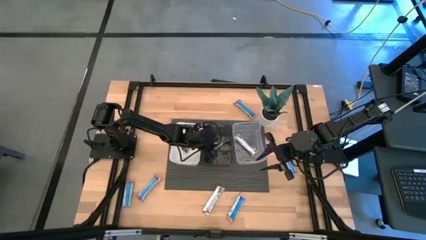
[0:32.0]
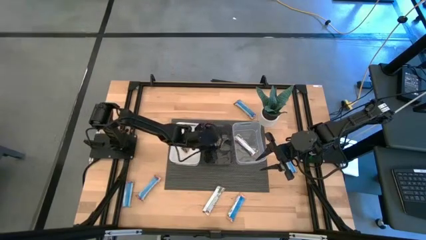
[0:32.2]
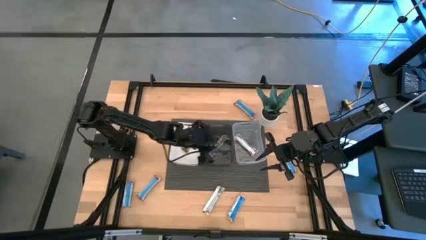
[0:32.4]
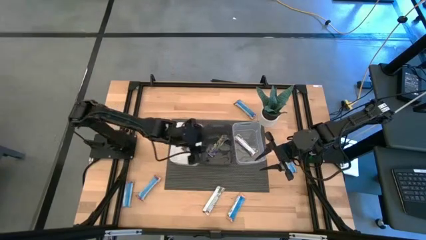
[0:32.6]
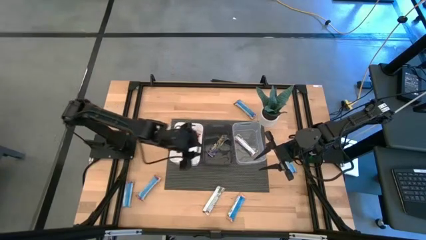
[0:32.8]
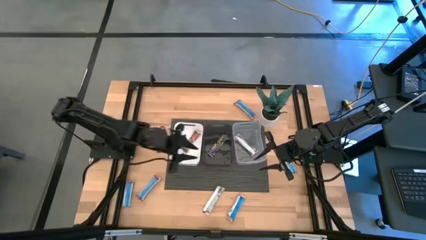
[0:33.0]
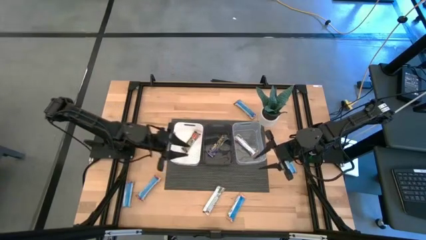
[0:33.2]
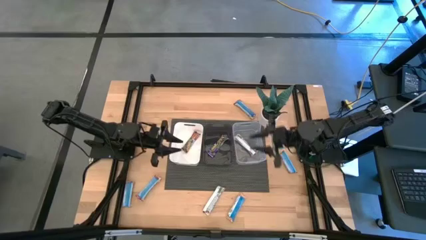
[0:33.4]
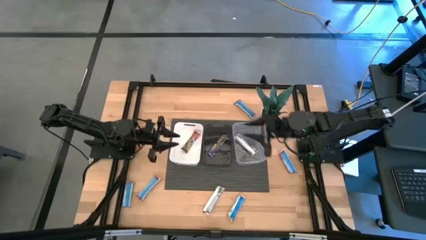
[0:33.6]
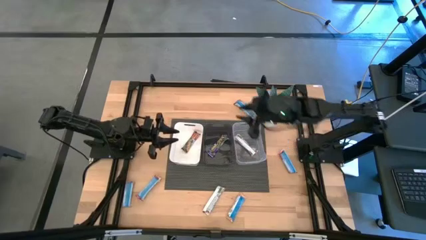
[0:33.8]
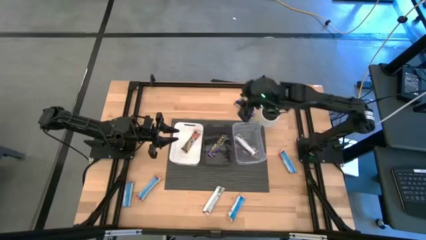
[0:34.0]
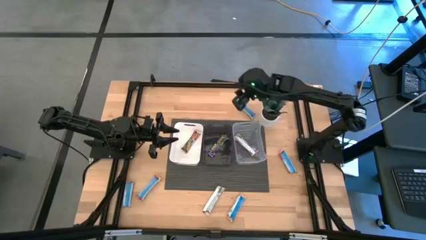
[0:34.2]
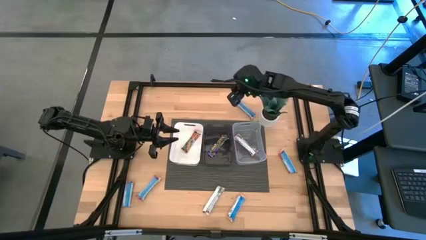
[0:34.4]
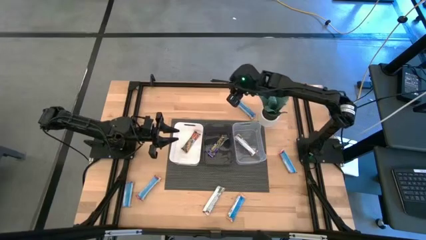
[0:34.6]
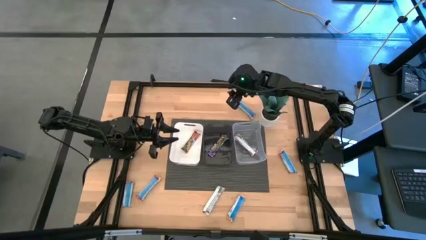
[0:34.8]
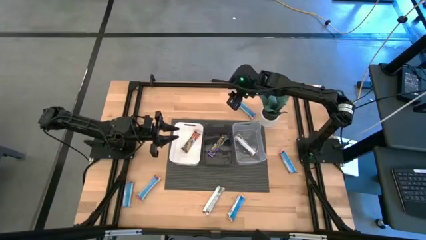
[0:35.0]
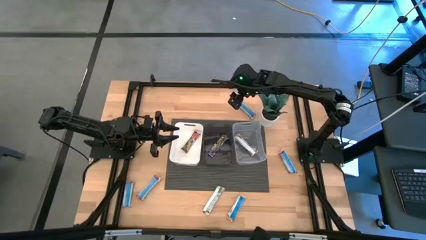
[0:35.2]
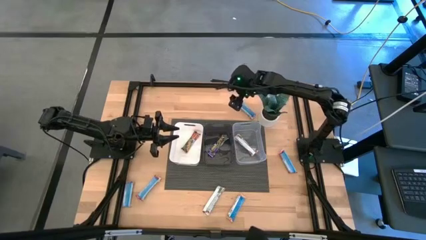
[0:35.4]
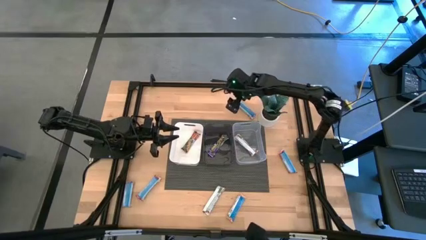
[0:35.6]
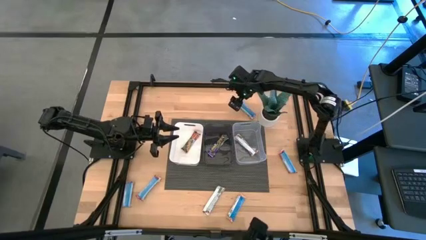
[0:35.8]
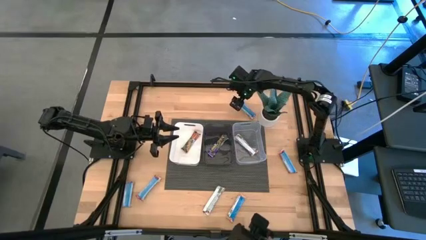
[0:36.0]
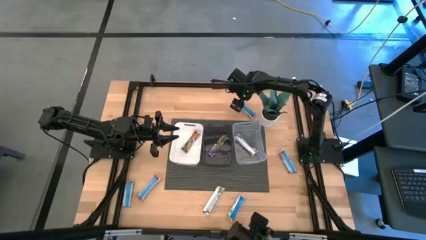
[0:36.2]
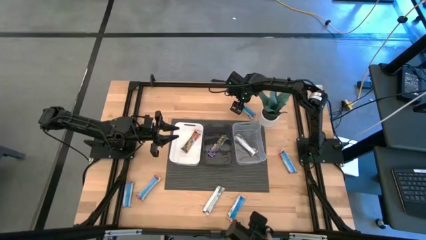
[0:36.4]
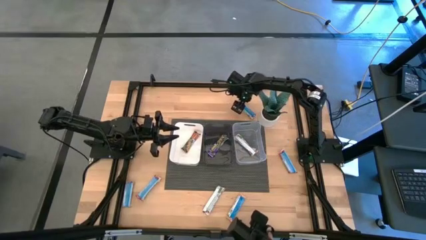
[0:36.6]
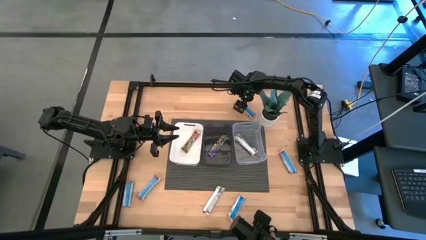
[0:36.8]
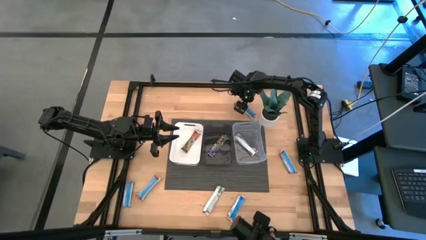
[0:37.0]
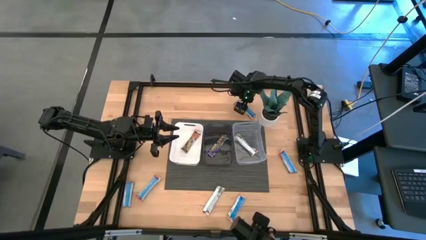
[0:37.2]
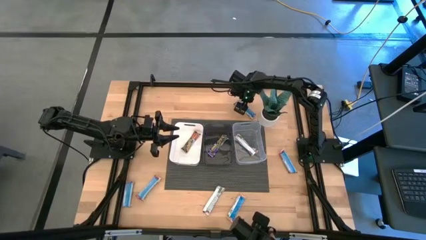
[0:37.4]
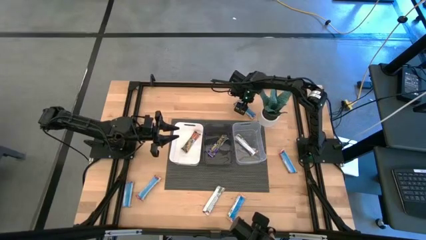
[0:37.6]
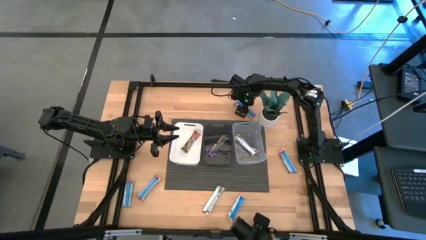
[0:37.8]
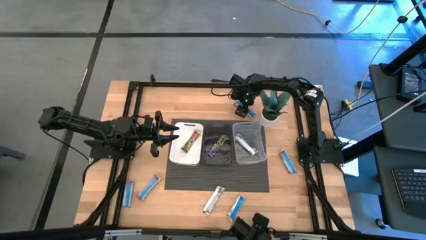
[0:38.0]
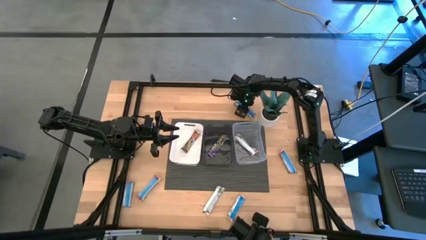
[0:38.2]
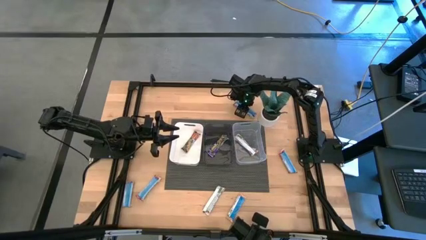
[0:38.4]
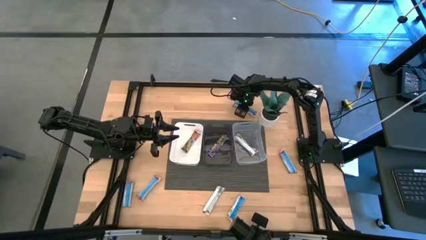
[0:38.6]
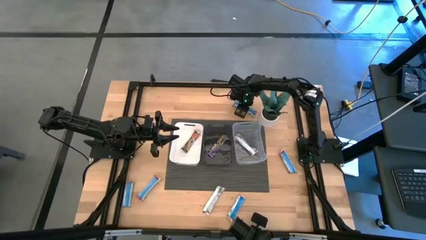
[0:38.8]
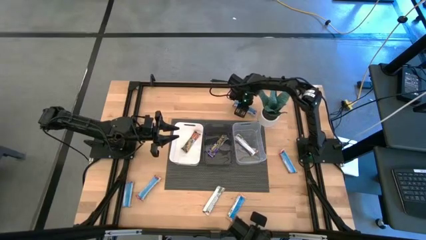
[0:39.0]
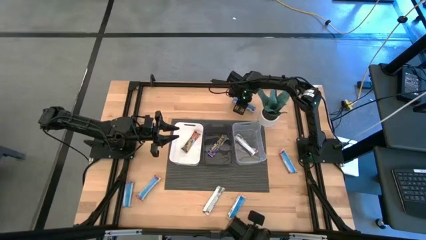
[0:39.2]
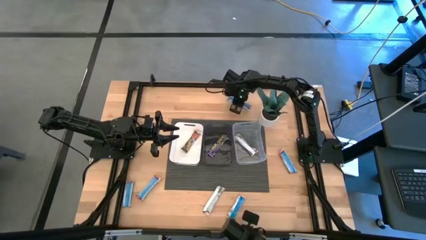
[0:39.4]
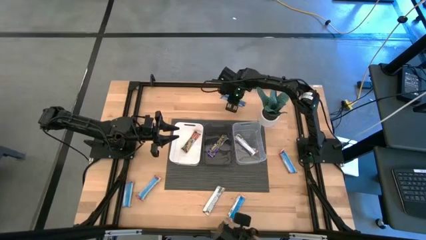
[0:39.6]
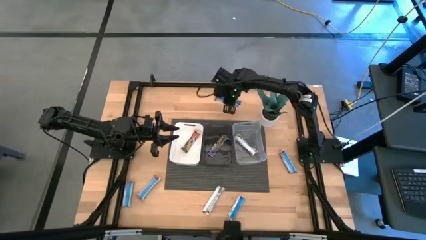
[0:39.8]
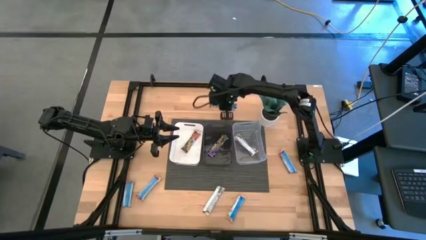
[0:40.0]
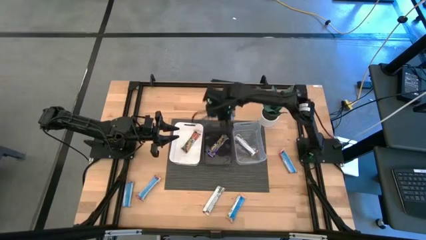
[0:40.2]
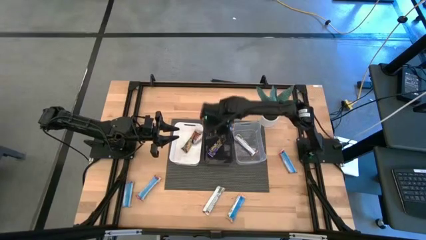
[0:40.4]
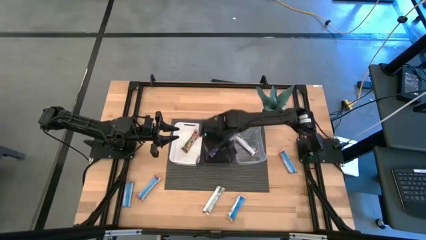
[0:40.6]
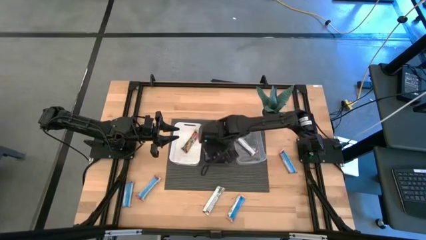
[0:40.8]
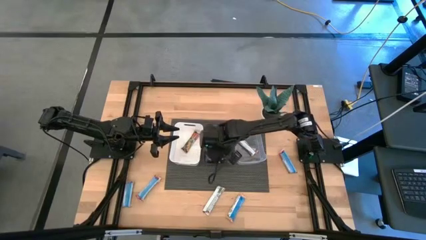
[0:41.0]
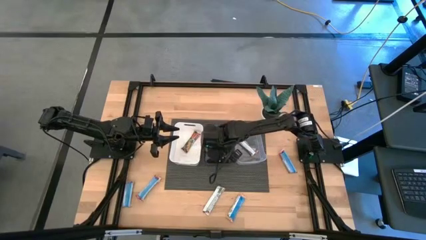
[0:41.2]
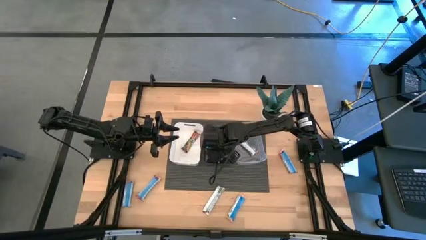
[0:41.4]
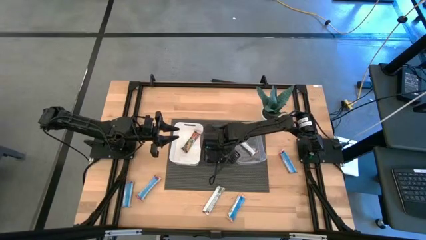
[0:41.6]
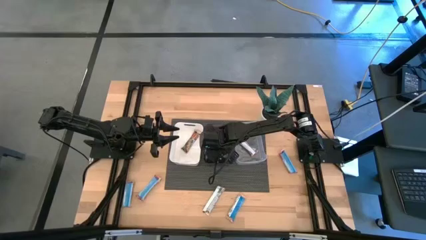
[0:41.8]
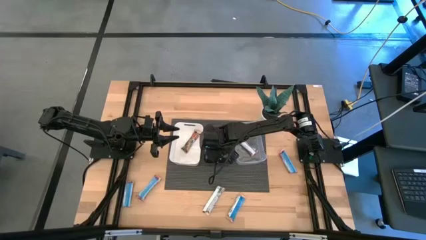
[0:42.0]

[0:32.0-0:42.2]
Task: Pick and place Granola Bars by type
Put the blue granola bar into the black bin

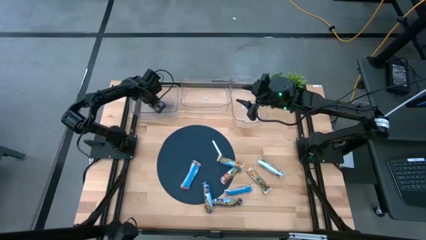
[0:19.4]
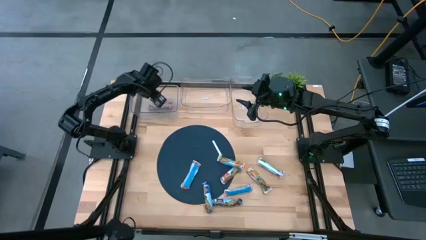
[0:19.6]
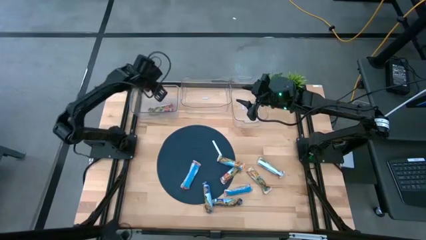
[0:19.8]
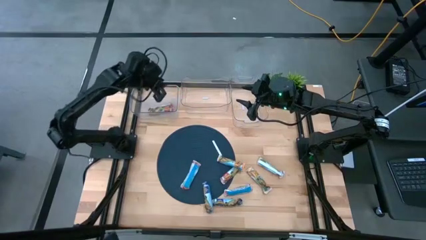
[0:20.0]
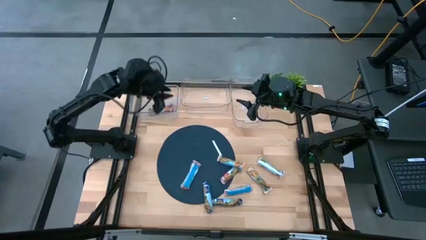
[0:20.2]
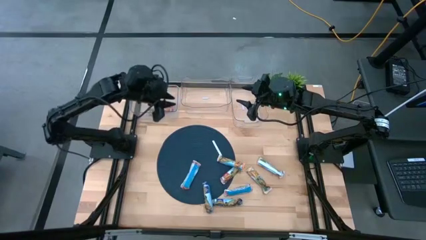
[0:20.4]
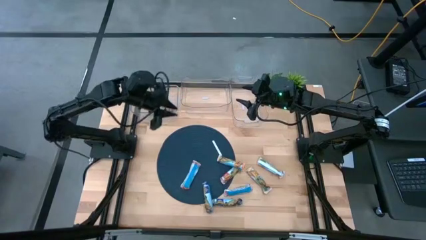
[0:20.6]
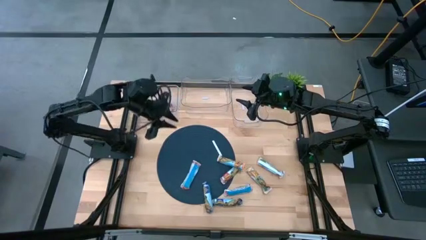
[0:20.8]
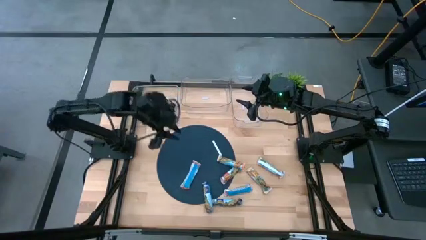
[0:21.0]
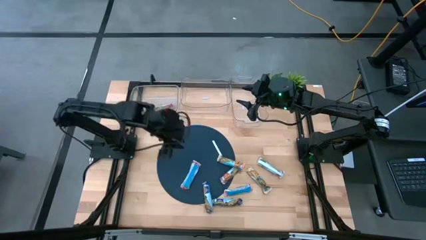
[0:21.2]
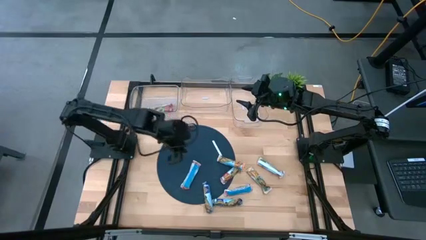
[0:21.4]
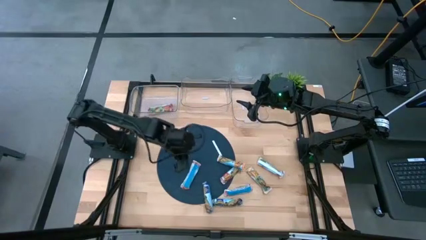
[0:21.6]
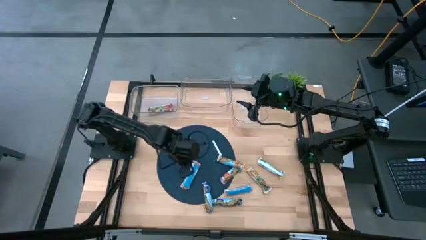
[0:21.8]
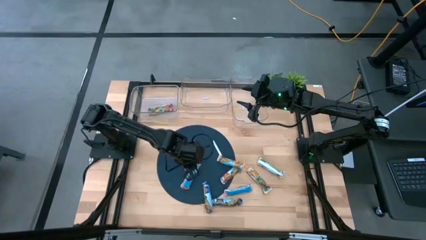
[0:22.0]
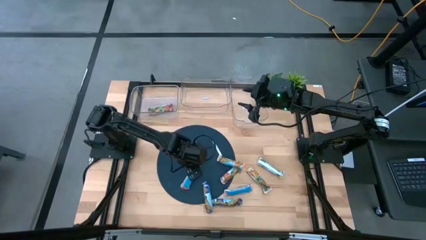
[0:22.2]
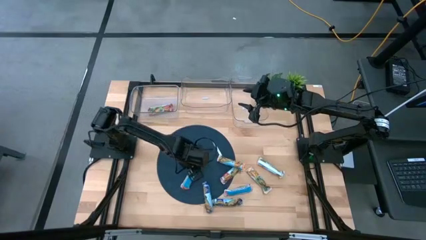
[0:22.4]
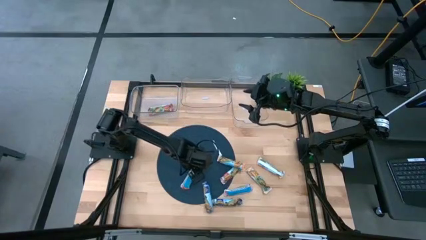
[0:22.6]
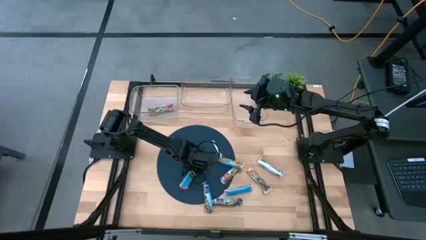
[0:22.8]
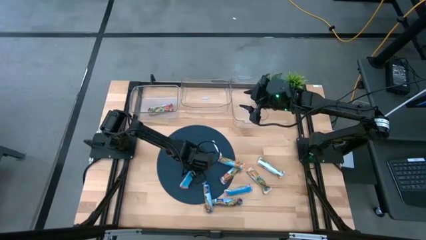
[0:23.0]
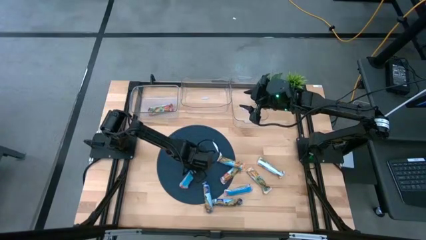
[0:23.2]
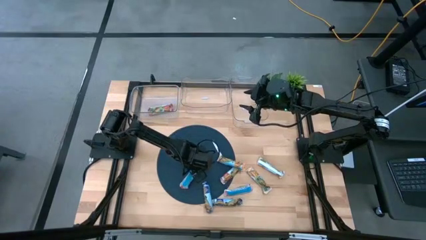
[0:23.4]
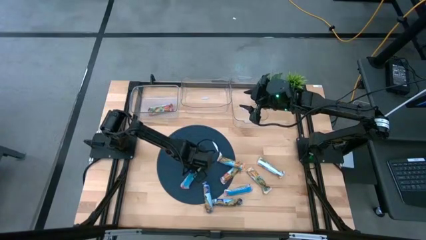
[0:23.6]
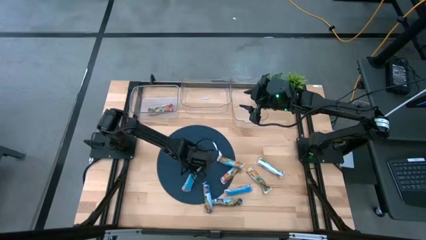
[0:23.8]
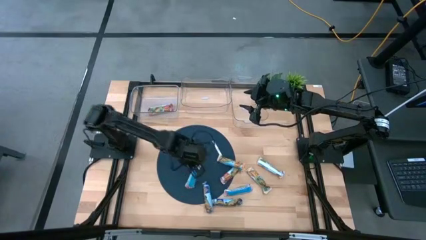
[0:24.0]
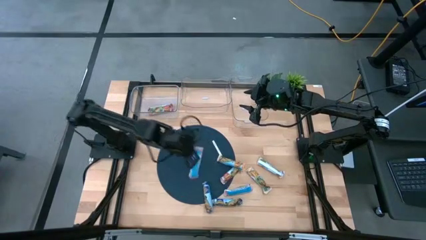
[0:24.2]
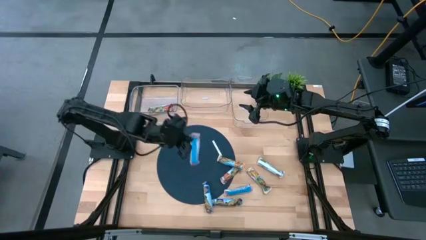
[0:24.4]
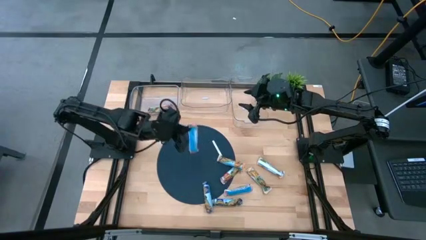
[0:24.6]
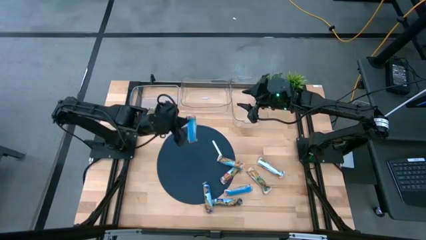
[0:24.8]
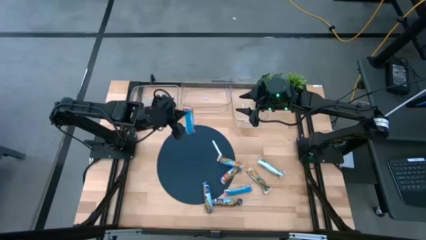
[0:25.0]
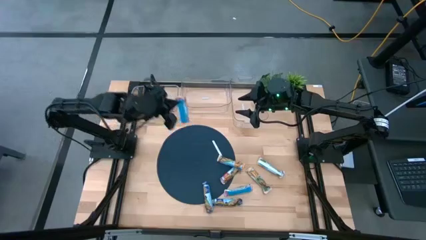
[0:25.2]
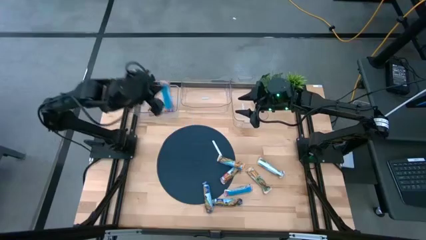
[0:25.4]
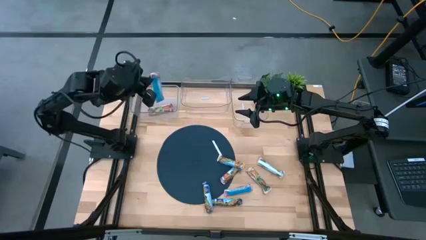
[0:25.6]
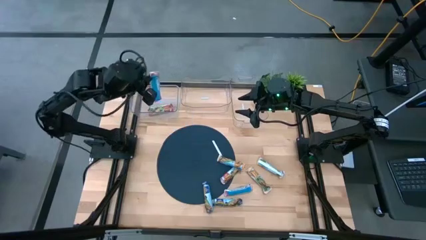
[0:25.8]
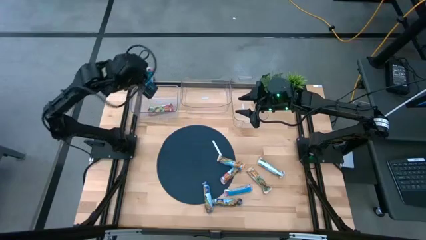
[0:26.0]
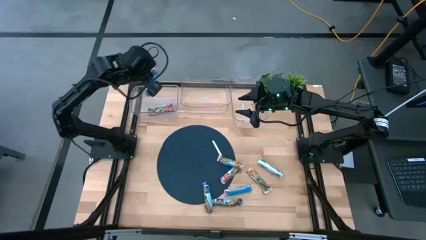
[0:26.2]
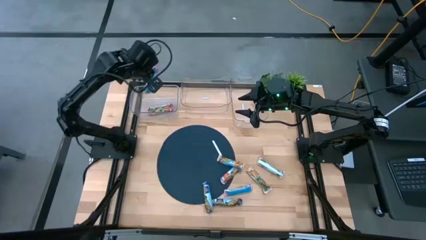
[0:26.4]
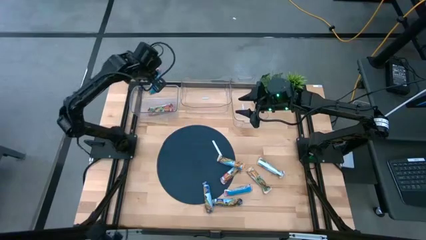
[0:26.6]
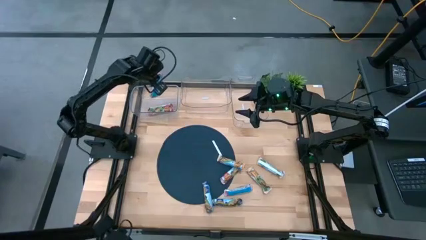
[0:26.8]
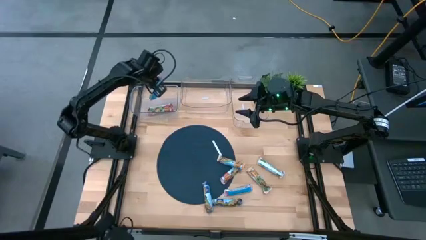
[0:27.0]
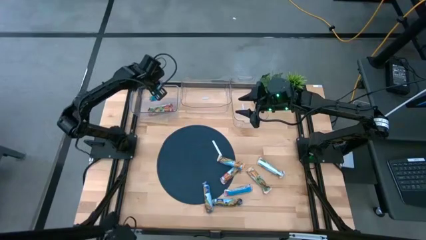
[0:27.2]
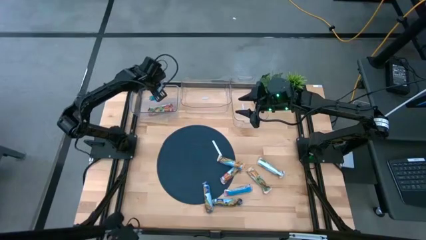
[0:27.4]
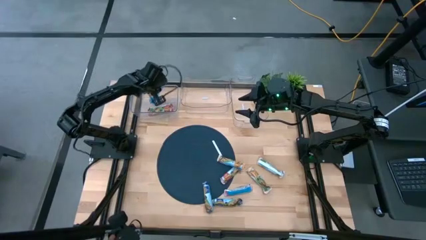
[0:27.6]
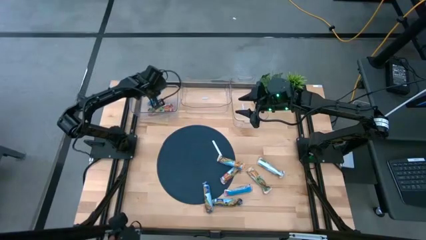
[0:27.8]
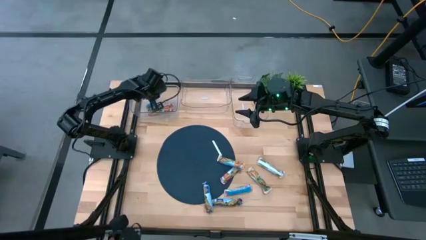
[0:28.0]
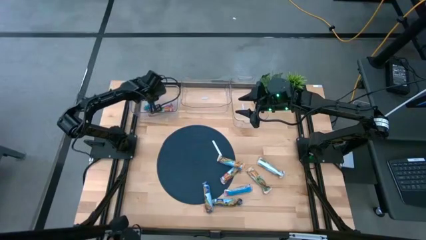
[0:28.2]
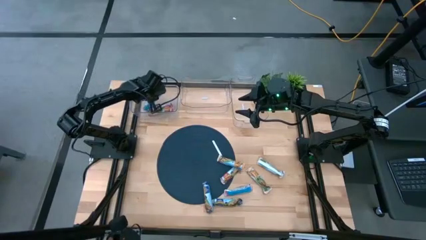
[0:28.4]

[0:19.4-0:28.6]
Task: Pick and place Granola Bars by type
Put the red chewy bar into the top left transparent bin
